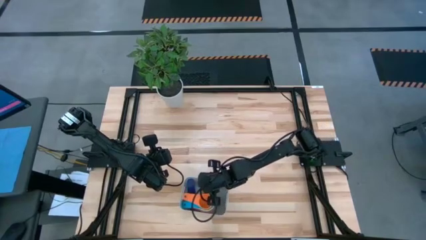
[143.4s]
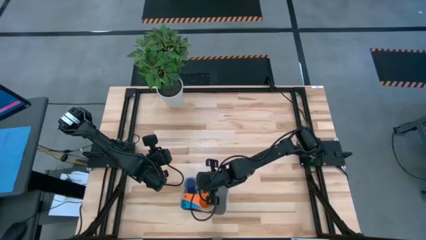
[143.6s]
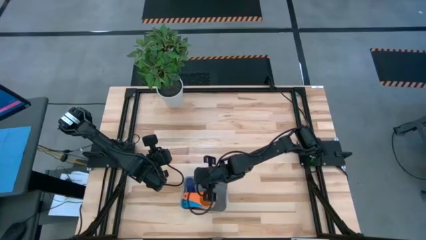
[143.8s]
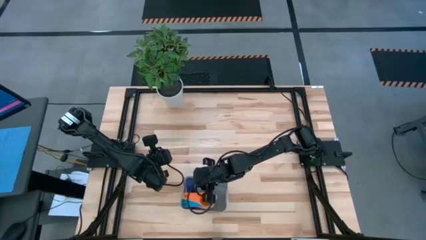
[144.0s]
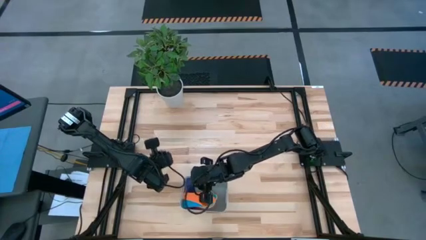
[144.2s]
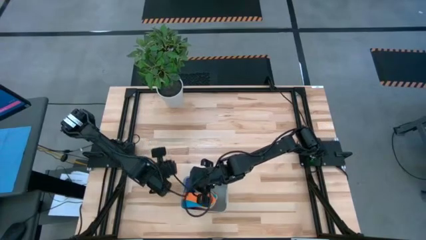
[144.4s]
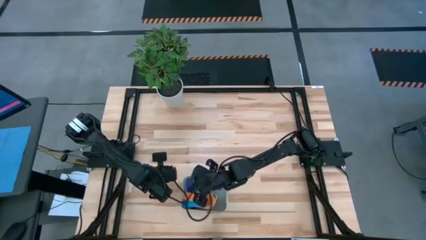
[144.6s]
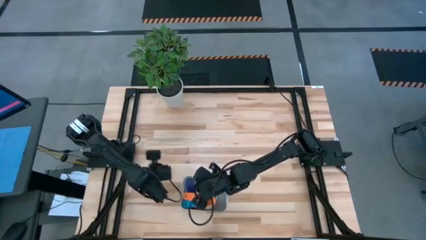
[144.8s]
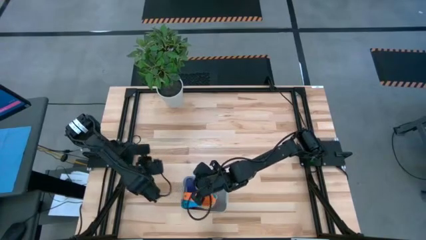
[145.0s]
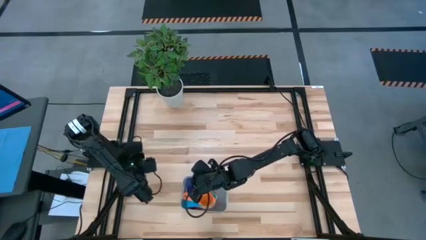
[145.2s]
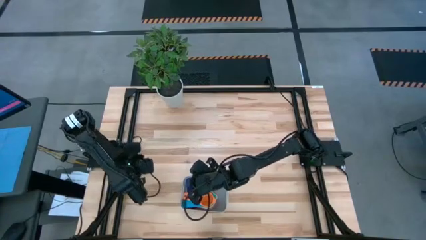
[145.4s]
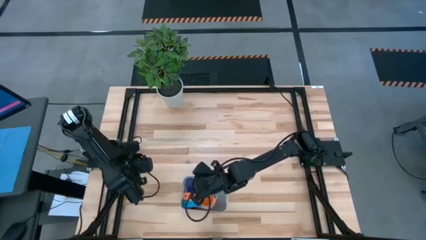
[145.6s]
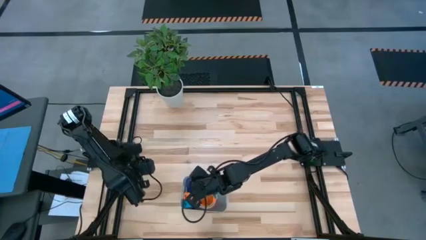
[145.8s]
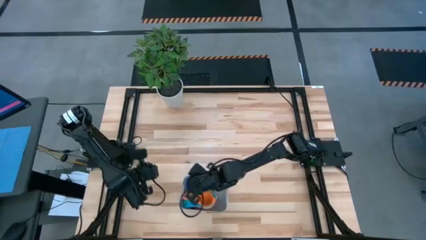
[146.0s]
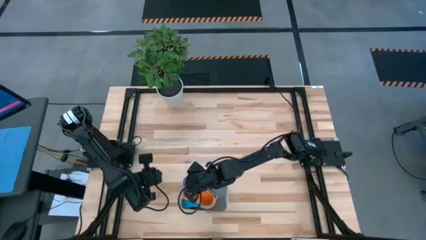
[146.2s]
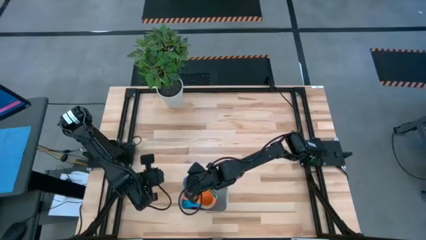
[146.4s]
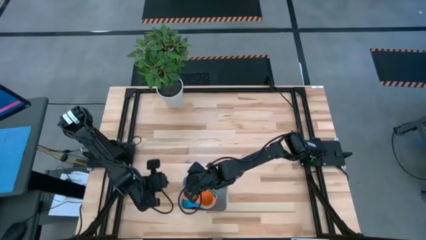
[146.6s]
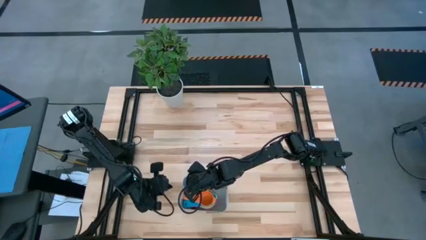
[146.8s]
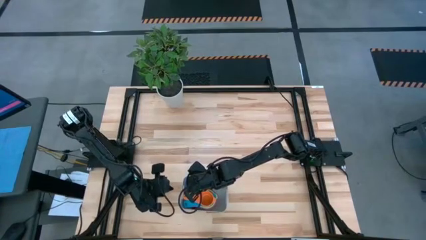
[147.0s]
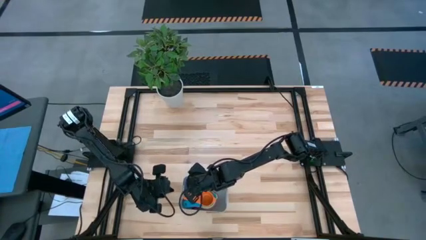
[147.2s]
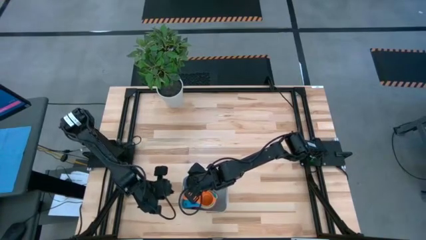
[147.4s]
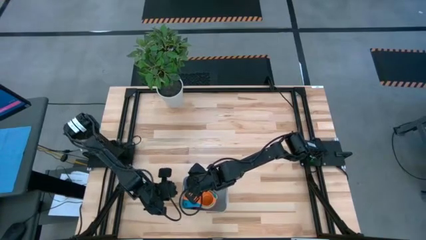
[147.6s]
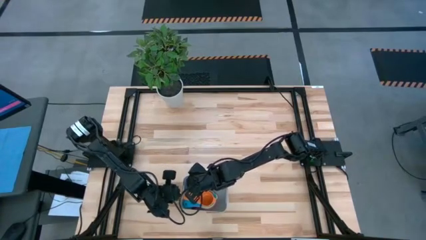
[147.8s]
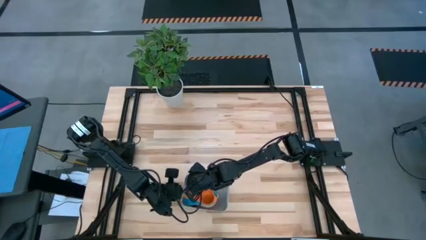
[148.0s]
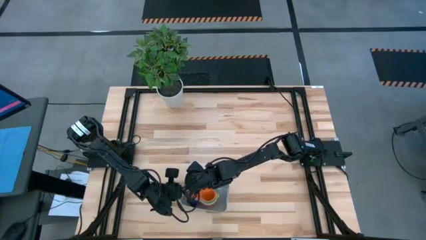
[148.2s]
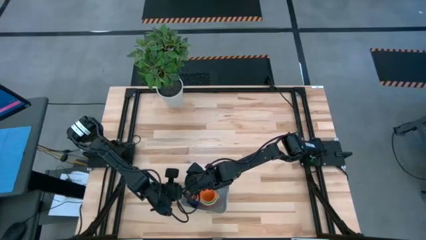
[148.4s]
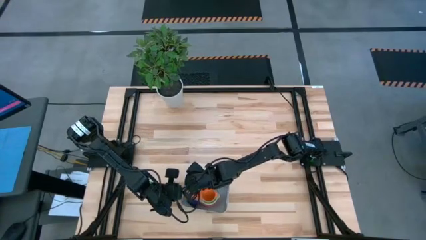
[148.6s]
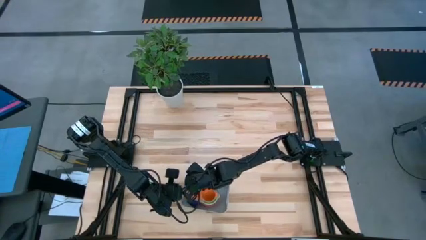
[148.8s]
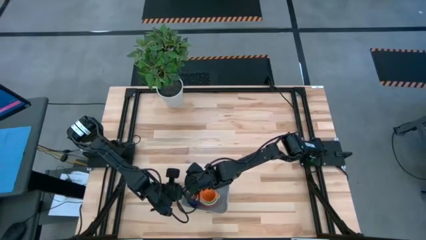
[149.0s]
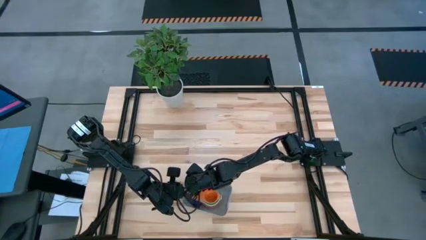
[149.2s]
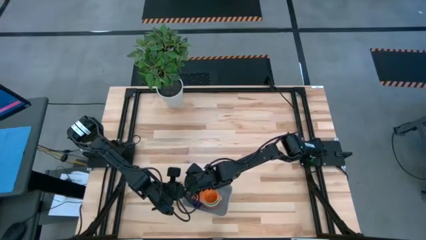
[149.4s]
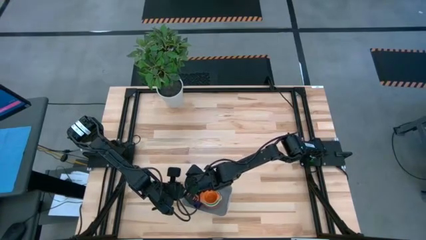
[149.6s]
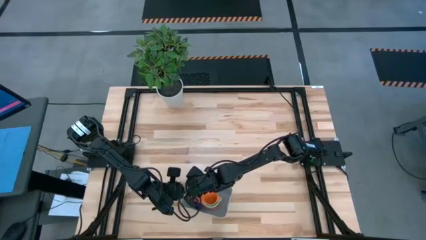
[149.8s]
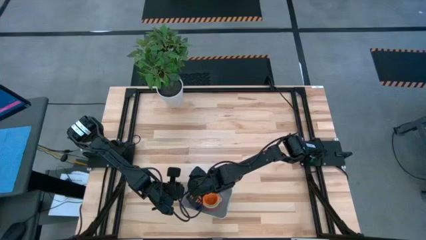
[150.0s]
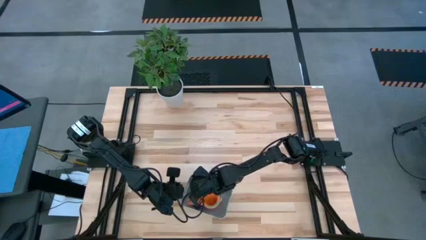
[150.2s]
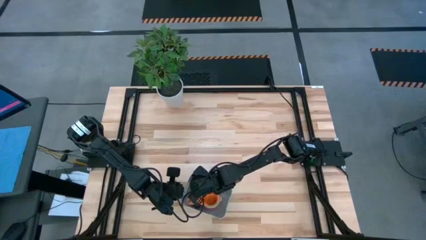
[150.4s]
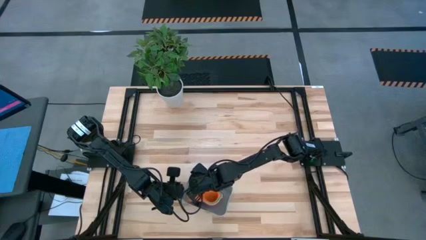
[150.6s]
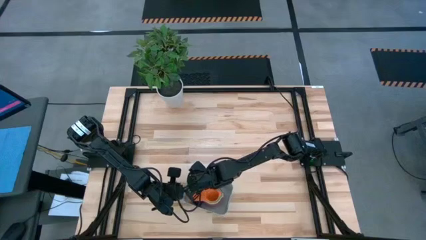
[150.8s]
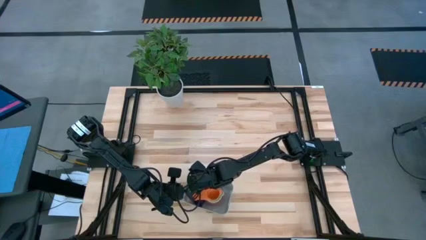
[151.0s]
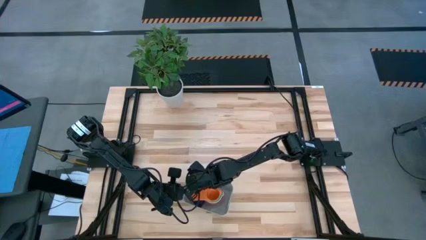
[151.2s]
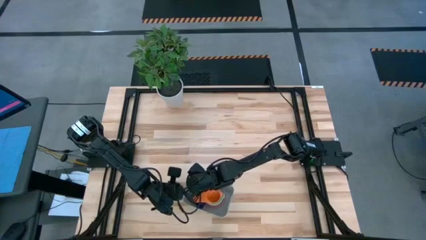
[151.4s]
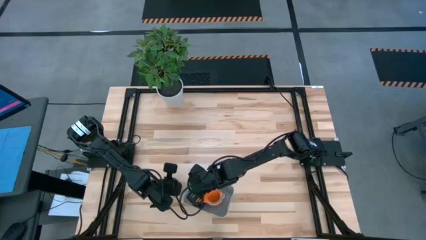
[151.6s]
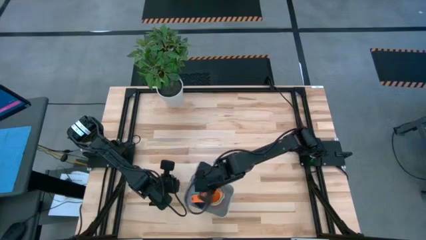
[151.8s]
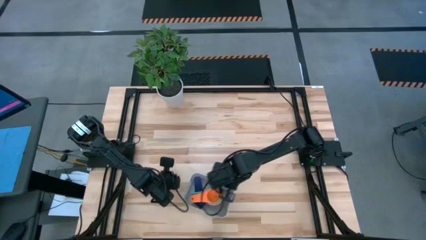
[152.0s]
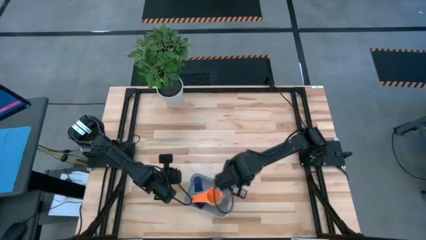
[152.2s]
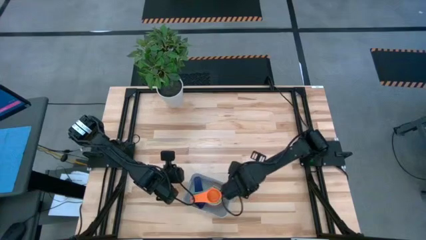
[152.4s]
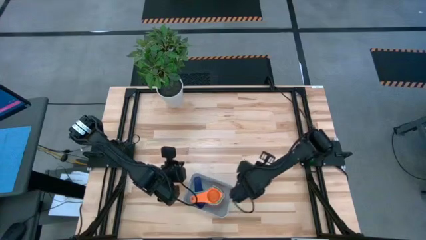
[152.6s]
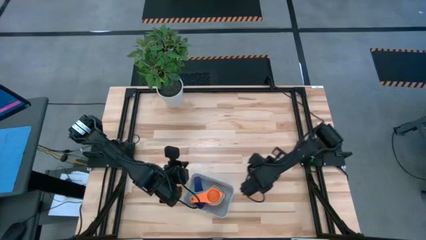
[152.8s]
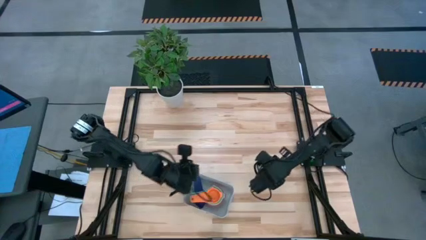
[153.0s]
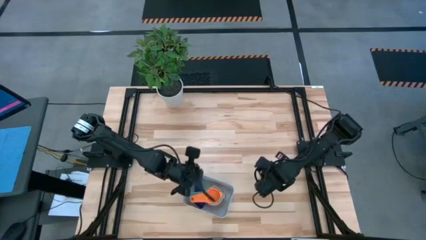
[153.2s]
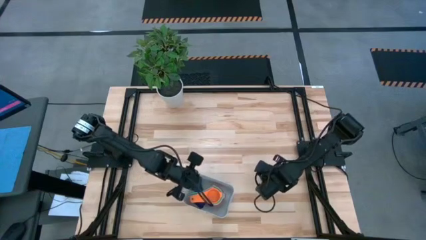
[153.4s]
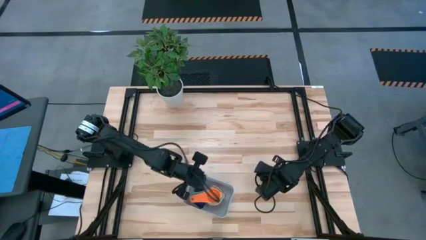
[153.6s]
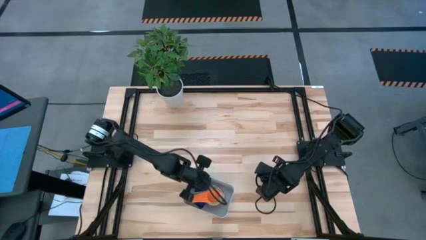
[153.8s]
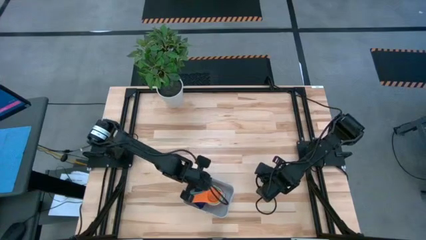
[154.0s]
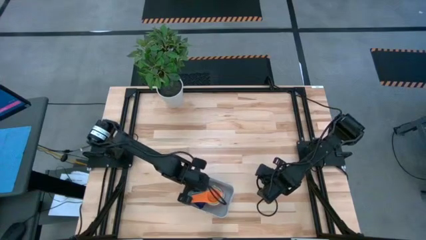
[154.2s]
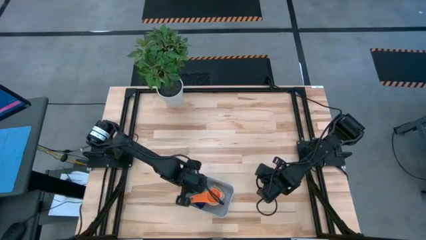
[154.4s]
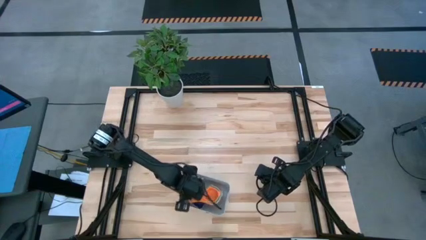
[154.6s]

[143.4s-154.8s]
Task: Nest measuring cups in basket
Remove the dark blue measuring cup from the gray bin

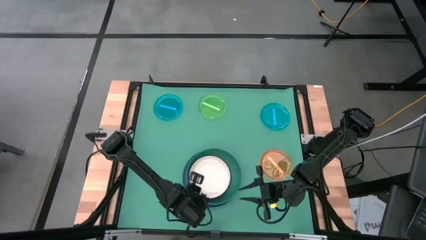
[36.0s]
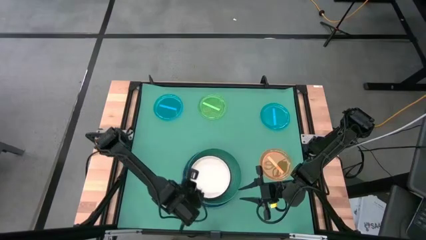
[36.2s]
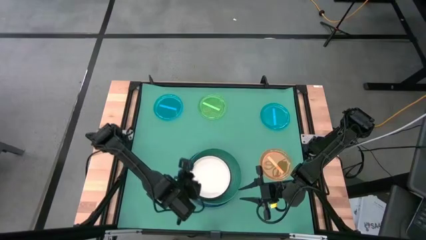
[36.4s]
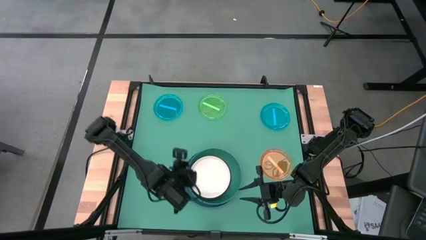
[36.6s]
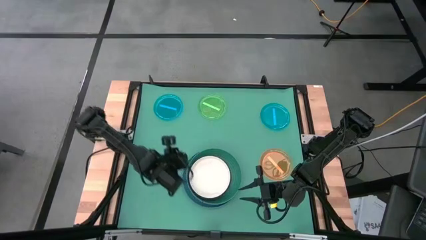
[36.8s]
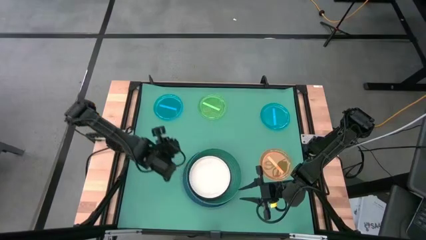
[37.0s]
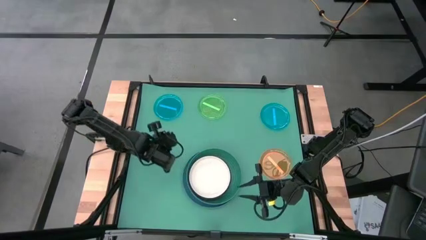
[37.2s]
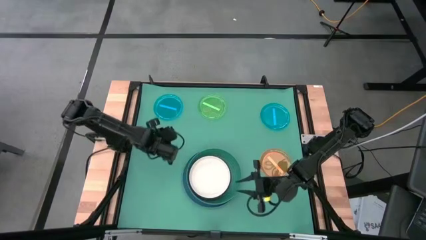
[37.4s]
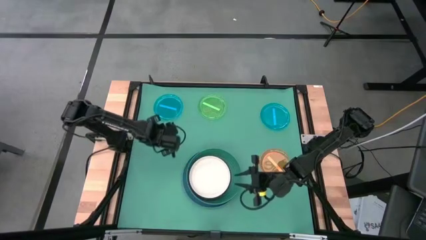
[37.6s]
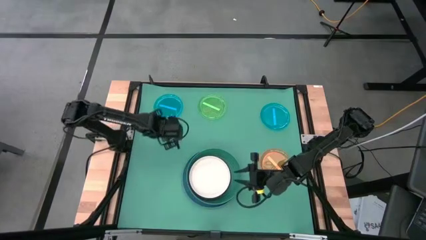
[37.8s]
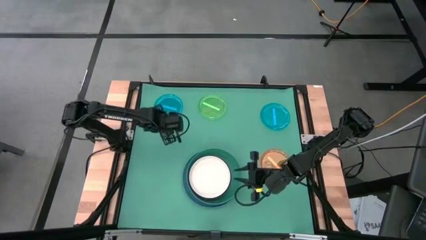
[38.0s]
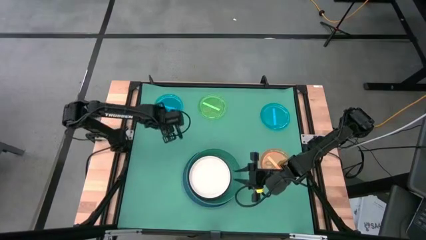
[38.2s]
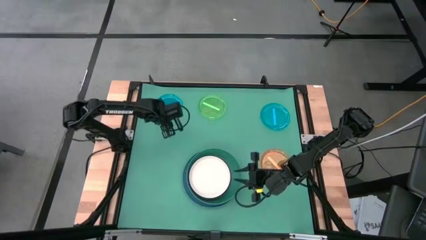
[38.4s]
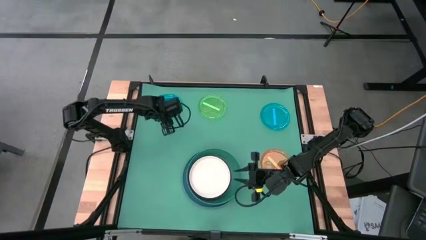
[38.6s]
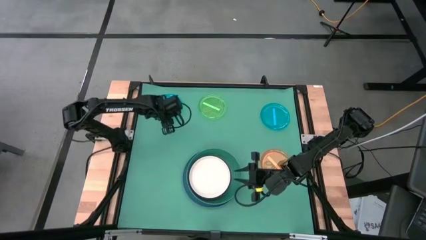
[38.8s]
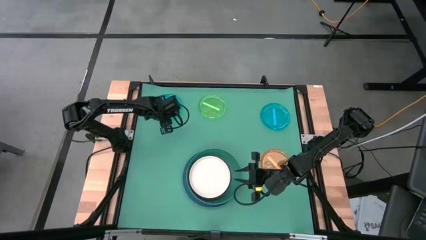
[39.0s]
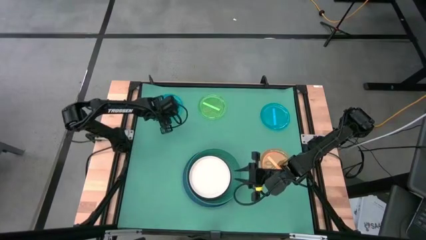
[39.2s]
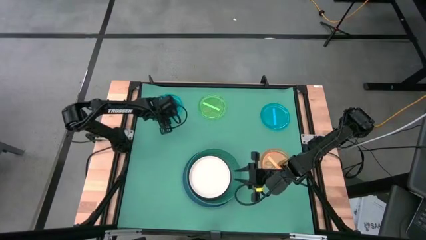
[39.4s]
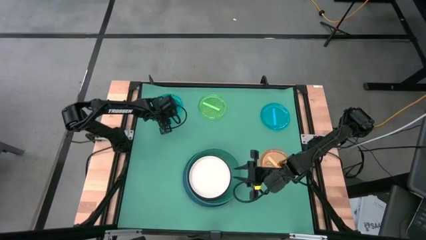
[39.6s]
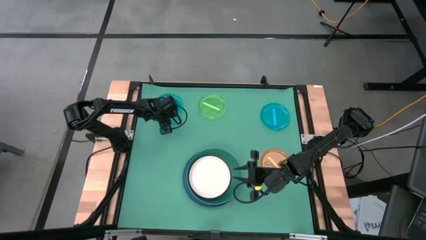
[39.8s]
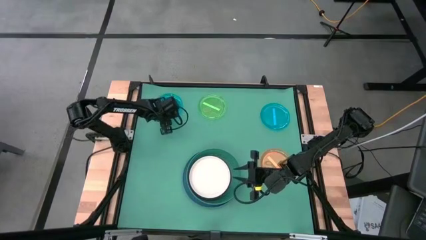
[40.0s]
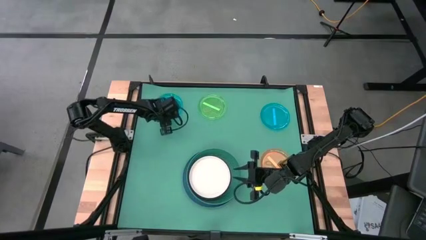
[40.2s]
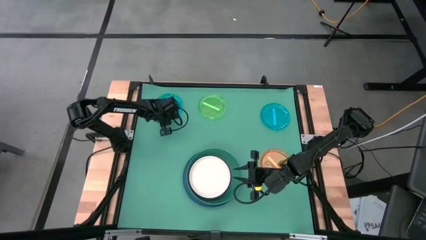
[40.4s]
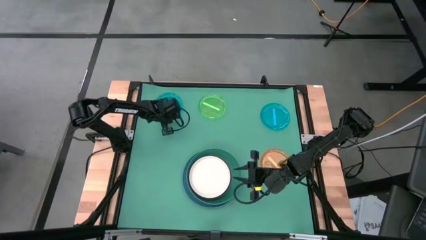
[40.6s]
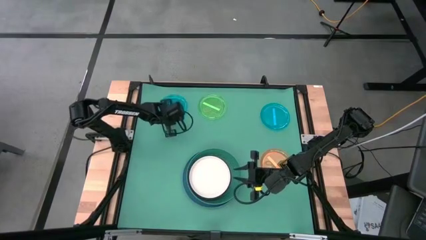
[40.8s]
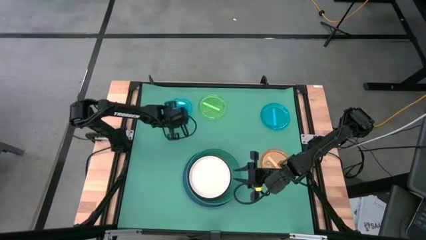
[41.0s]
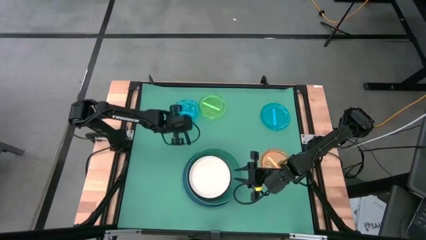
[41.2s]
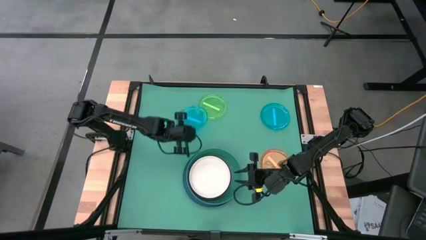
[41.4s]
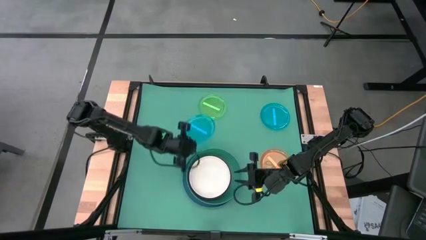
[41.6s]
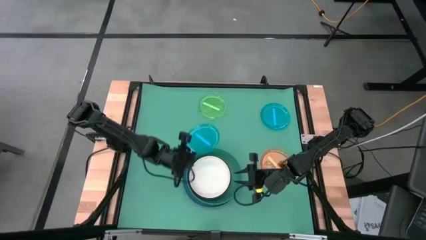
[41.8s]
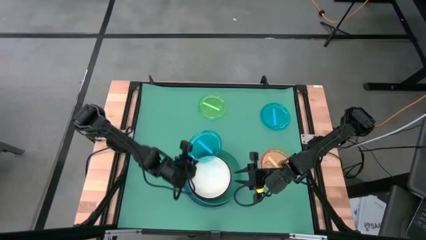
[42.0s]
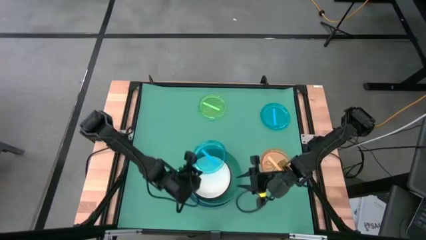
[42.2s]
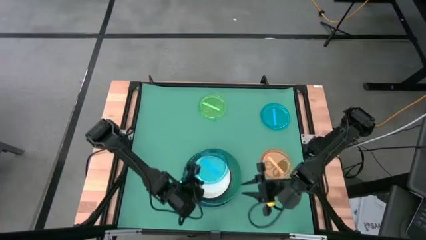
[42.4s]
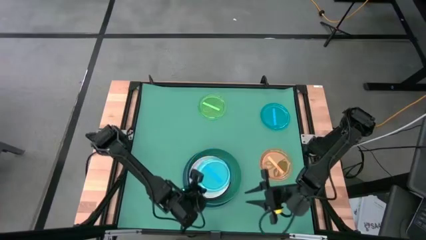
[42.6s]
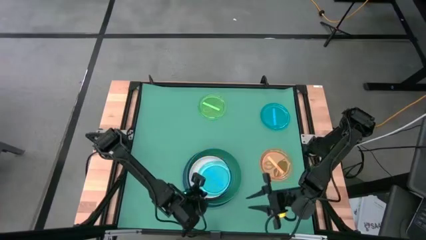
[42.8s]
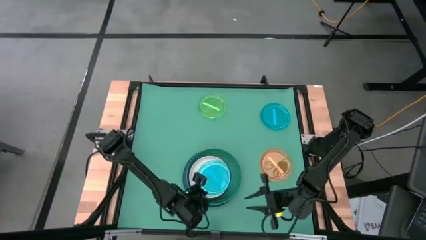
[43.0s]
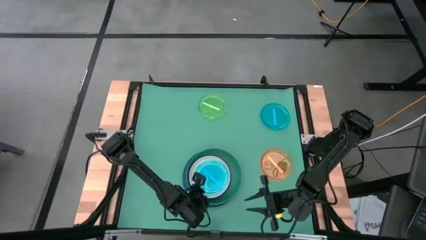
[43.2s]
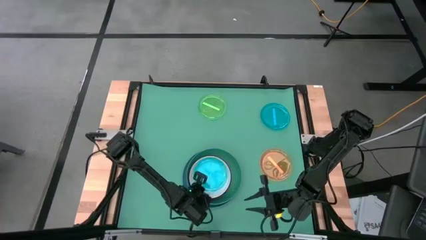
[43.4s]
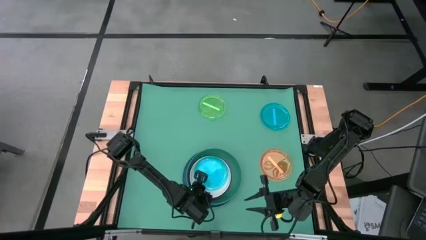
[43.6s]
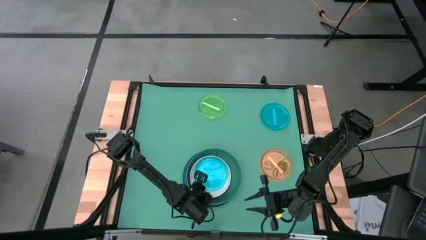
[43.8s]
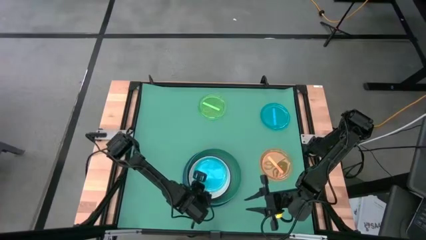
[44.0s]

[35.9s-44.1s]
Task: Stack plastic plates
Stack the left blue transparent plate on top of the white plate
